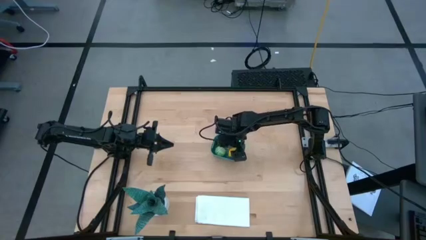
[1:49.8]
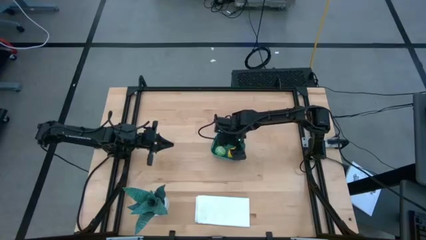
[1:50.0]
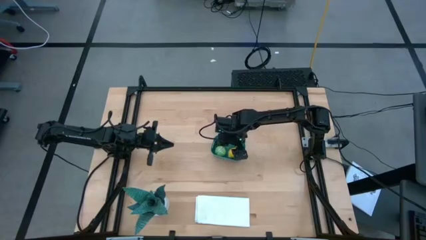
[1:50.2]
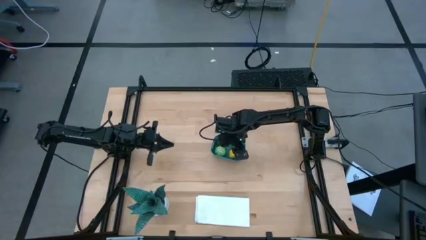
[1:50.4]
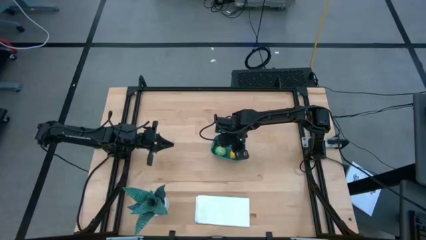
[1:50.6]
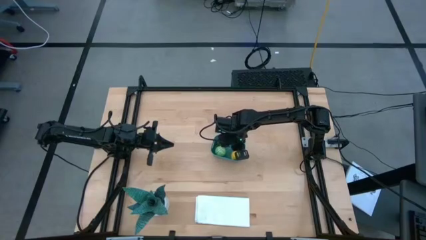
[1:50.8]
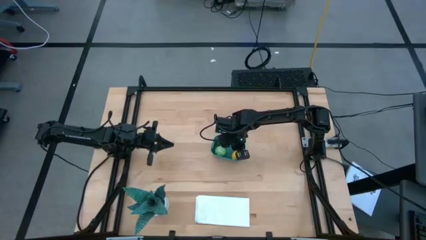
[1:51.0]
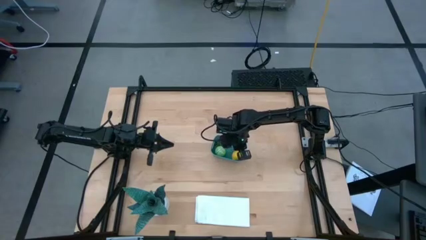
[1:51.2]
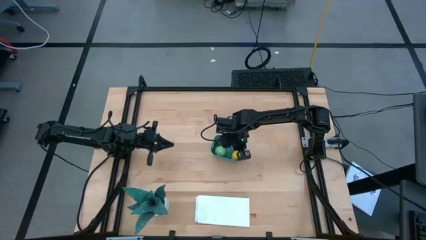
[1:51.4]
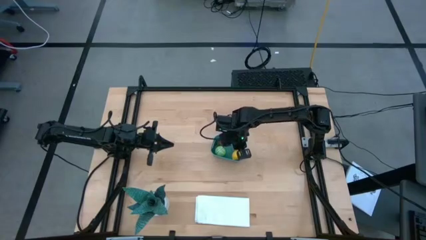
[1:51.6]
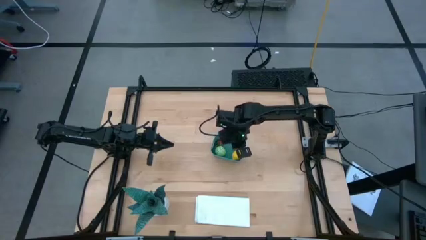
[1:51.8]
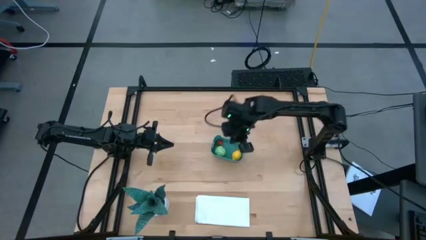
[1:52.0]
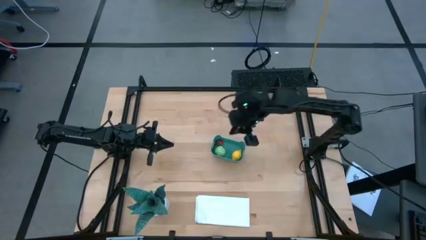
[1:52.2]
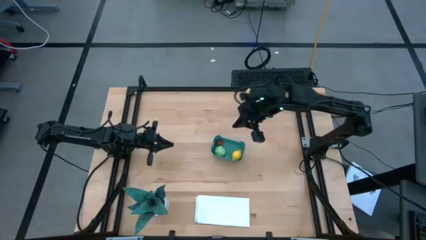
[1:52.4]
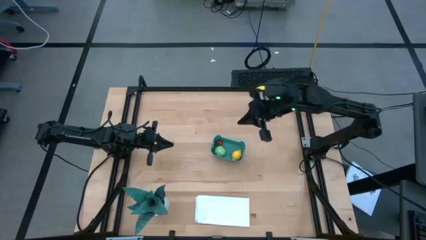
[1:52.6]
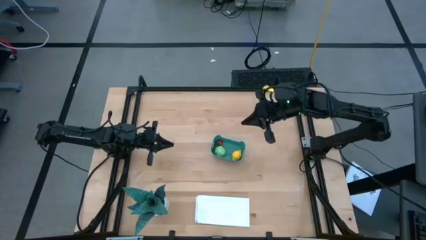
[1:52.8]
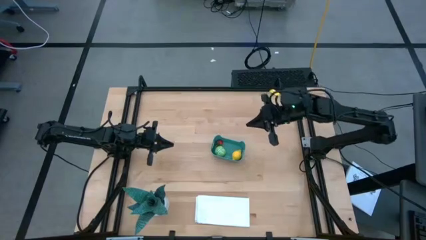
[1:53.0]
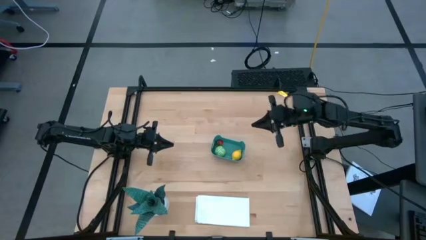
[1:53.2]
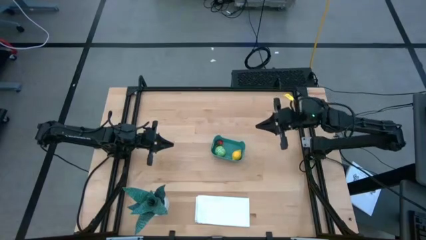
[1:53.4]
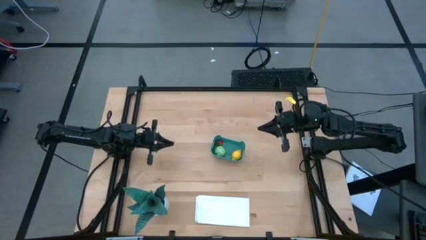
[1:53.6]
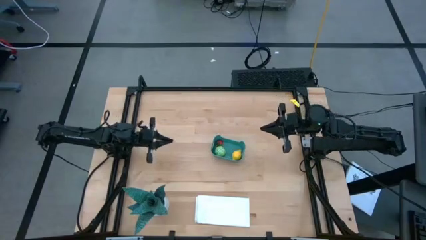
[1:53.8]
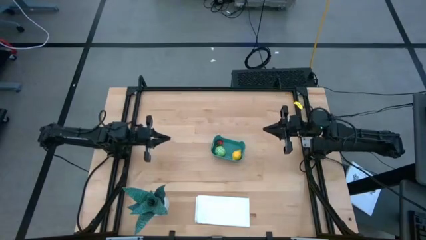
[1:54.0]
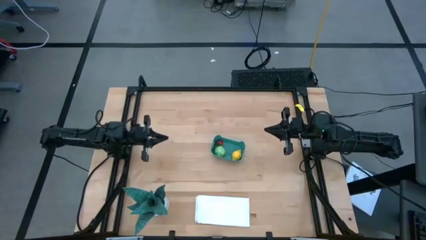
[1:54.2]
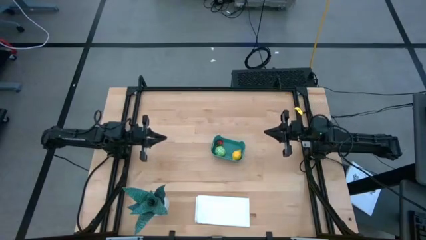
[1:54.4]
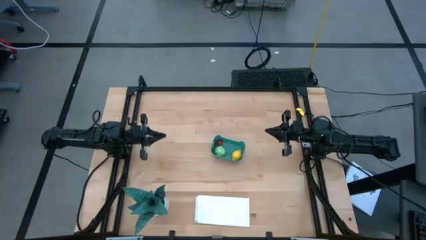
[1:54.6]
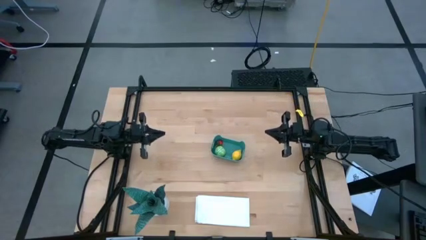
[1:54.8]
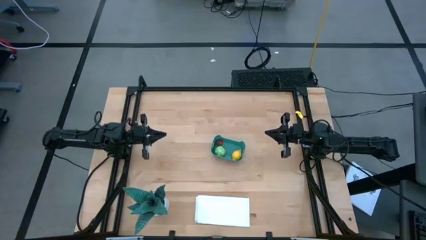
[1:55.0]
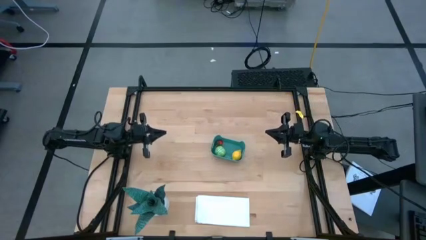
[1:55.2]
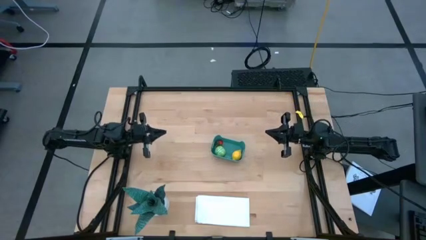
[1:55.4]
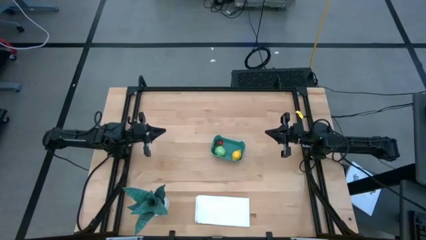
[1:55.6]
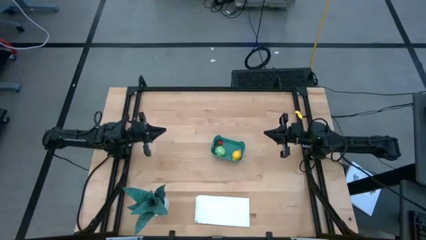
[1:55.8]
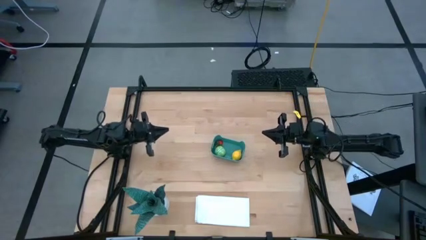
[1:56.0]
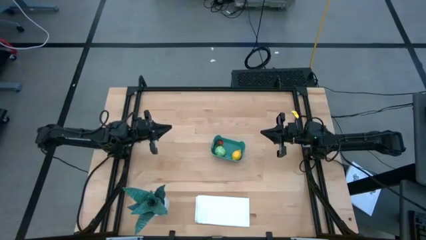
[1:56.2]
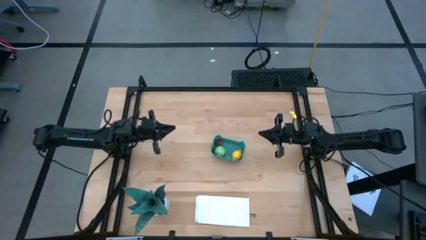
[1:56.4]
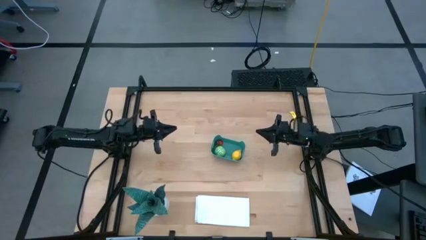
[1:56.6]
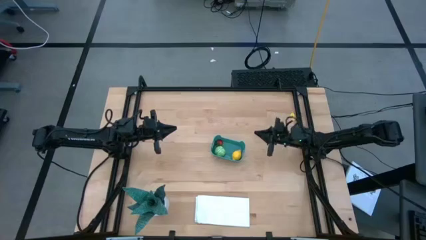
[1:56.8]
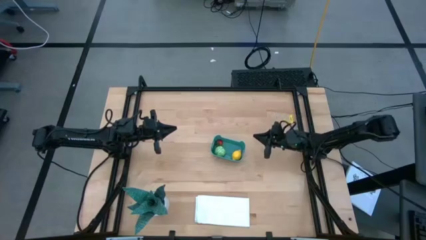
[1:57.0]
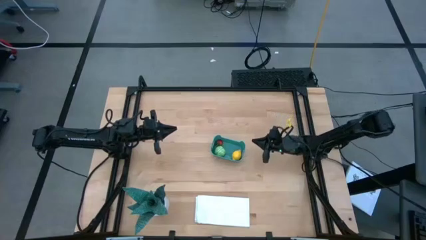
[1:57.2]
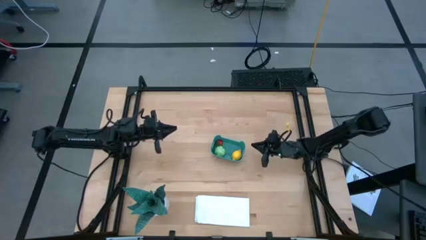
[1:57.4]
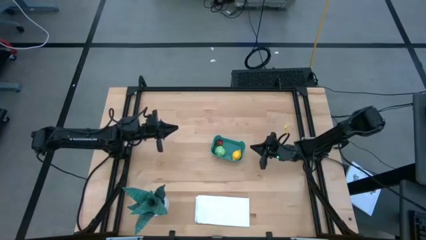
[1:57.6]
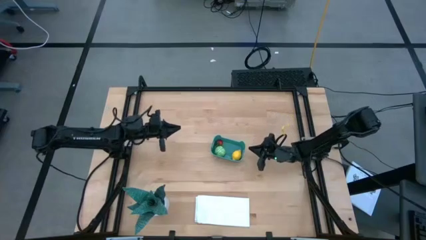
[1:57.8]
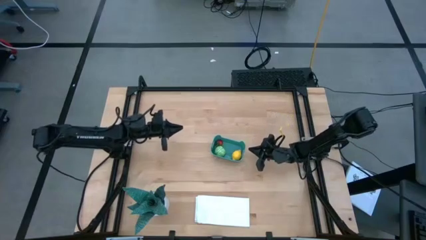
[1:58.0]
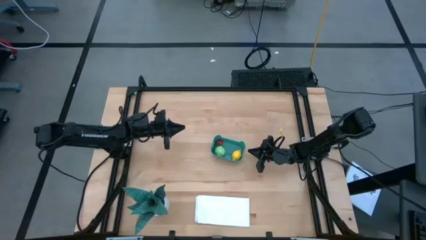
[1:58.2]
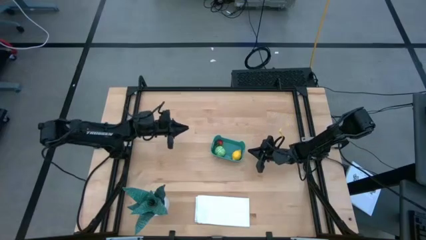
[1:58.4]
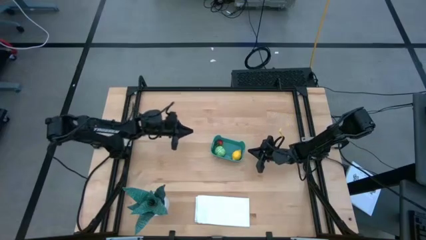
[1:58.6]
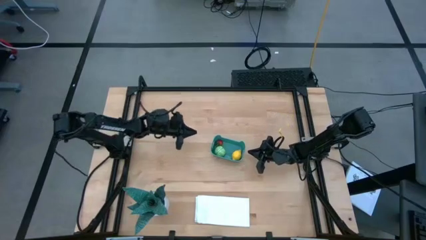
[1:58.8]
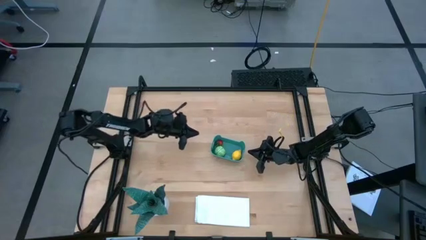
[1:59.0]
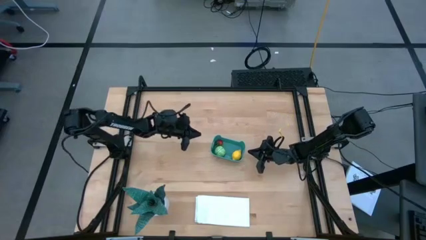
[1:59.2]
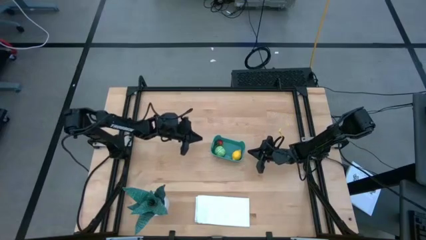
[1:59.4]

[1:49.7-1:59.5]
Task: Pick and placing Produce into tupperware
Adjust the blue bin

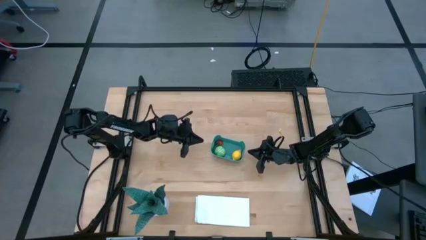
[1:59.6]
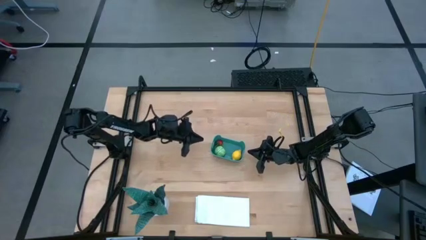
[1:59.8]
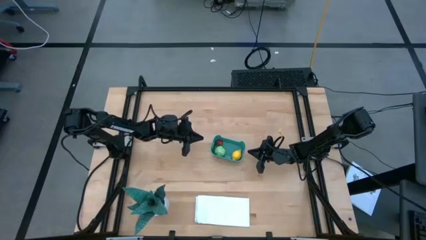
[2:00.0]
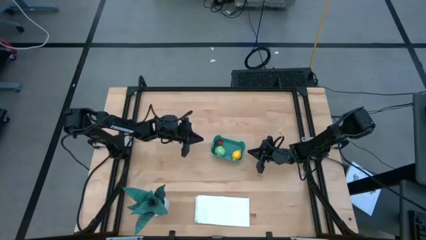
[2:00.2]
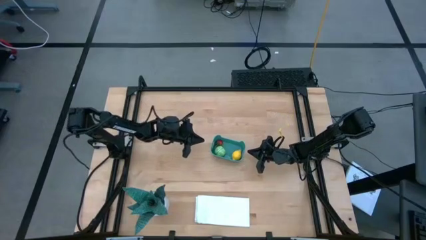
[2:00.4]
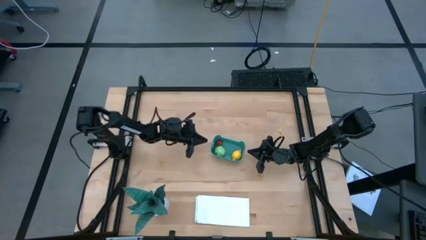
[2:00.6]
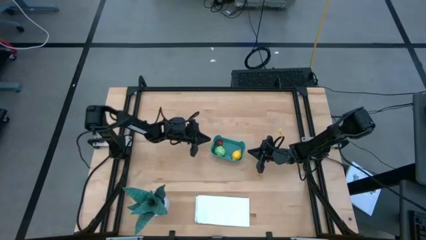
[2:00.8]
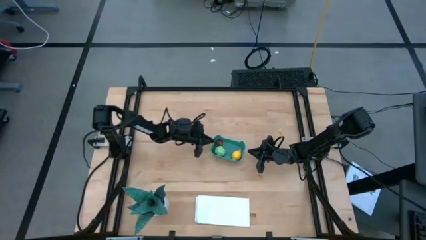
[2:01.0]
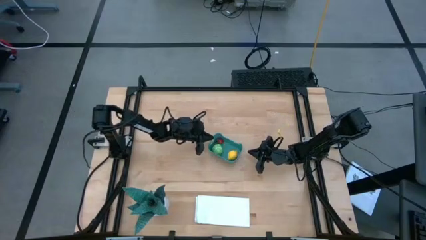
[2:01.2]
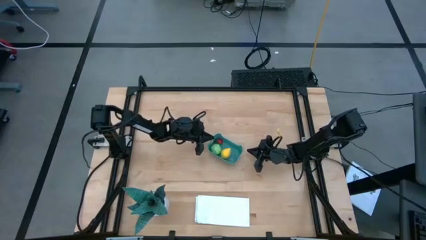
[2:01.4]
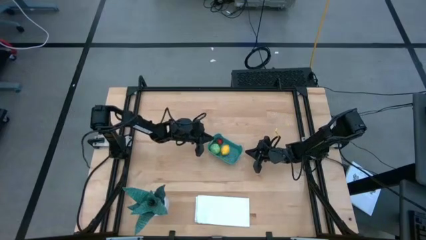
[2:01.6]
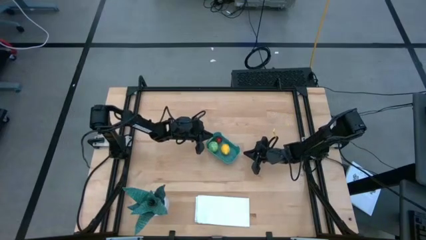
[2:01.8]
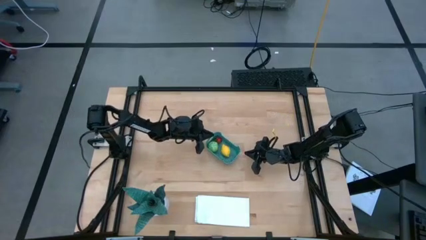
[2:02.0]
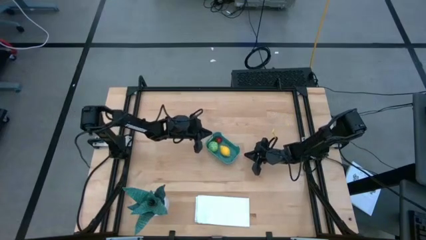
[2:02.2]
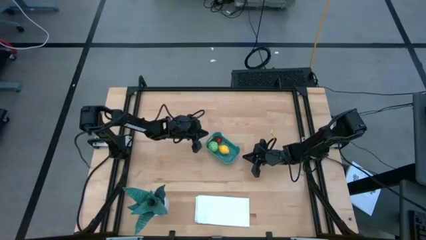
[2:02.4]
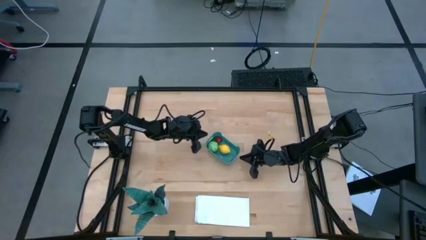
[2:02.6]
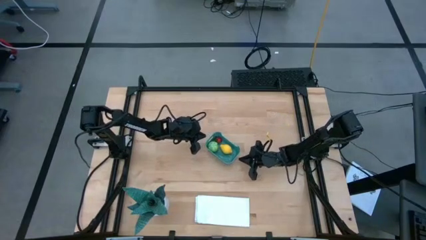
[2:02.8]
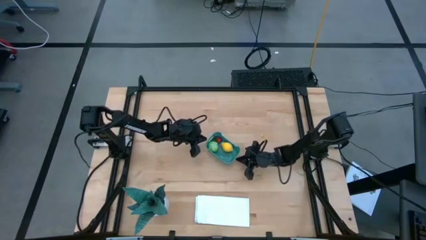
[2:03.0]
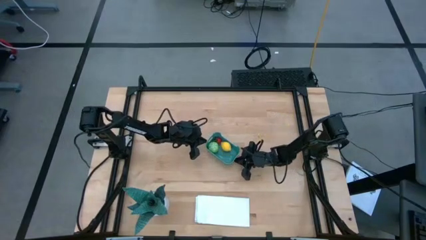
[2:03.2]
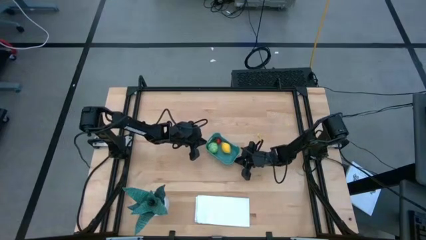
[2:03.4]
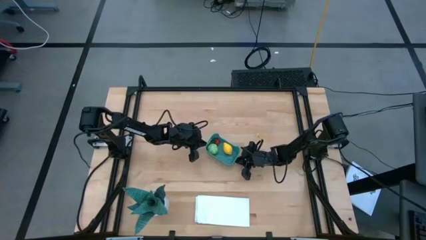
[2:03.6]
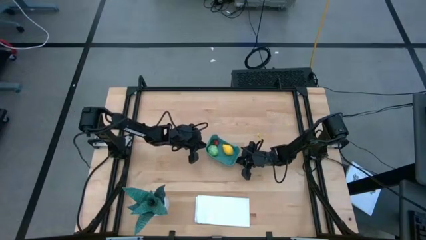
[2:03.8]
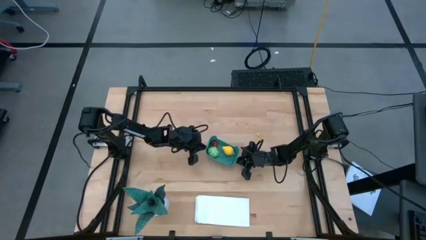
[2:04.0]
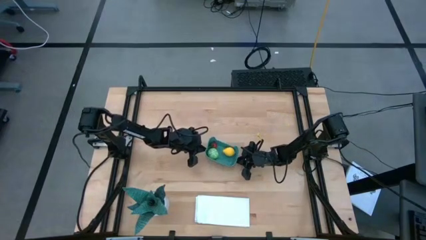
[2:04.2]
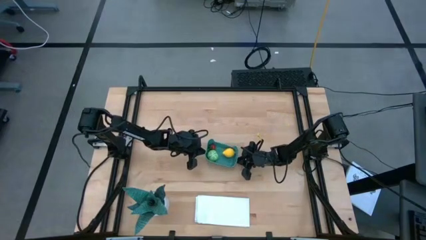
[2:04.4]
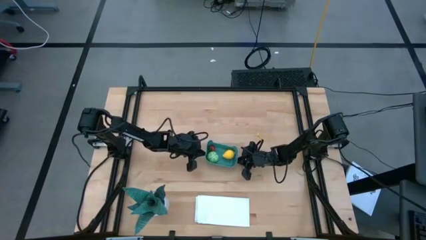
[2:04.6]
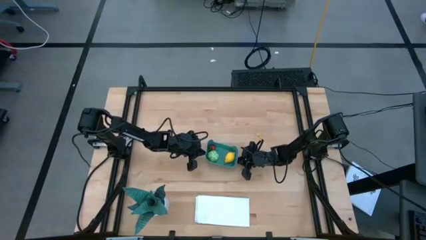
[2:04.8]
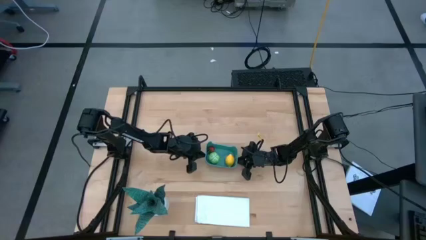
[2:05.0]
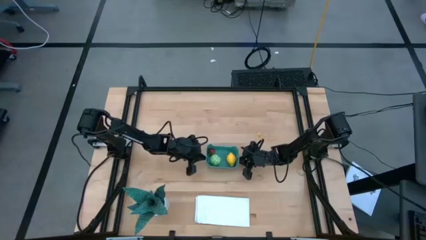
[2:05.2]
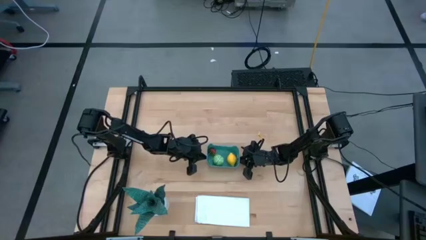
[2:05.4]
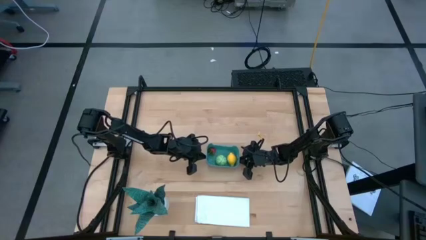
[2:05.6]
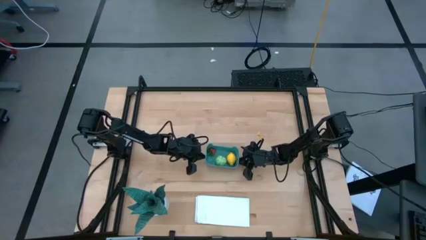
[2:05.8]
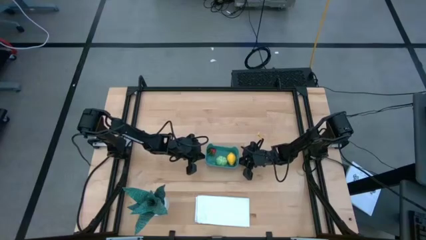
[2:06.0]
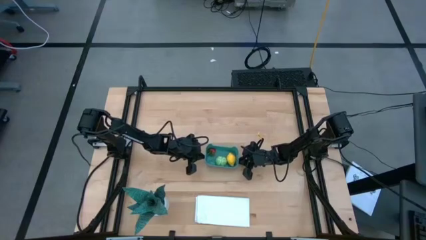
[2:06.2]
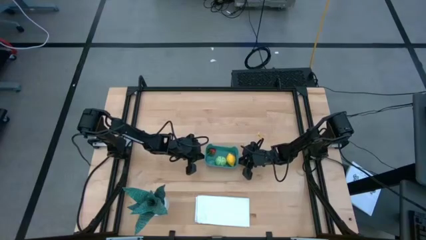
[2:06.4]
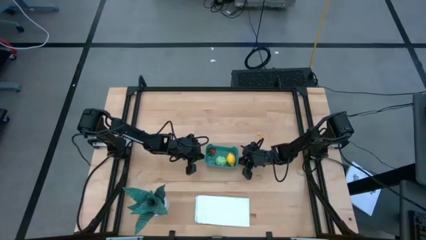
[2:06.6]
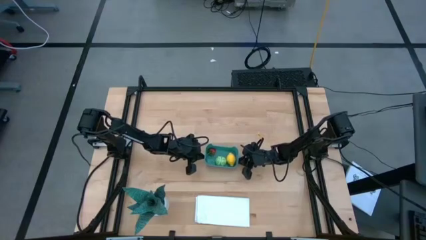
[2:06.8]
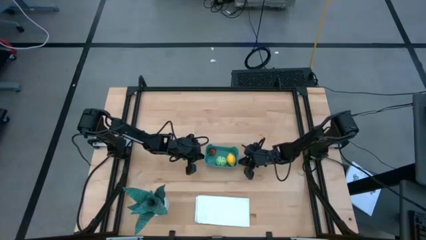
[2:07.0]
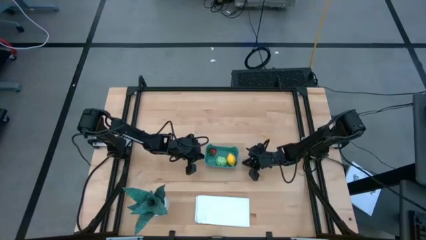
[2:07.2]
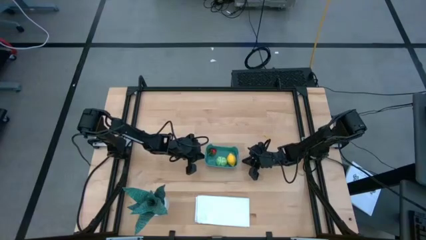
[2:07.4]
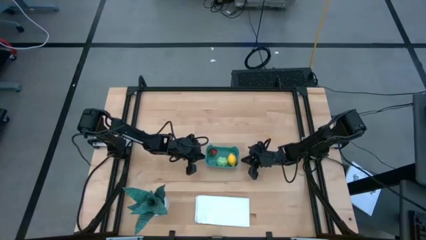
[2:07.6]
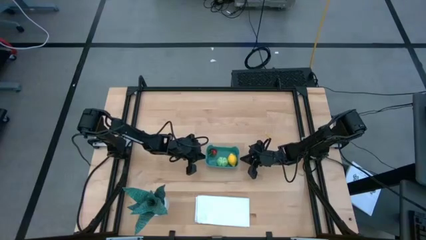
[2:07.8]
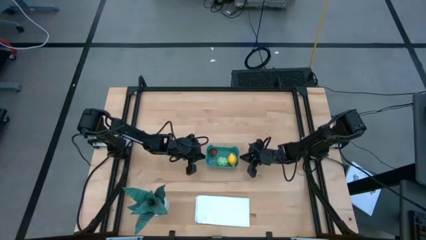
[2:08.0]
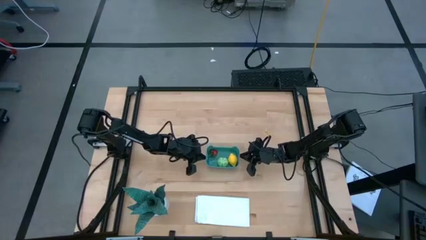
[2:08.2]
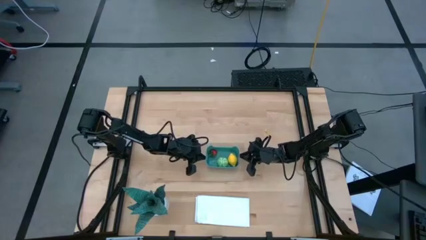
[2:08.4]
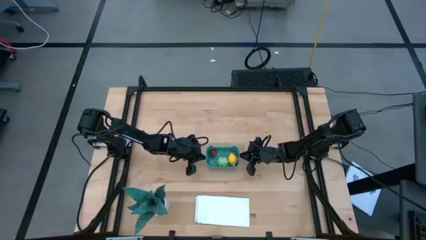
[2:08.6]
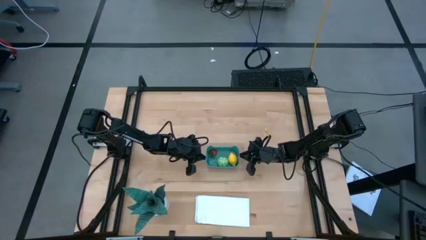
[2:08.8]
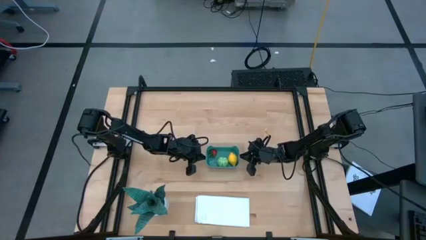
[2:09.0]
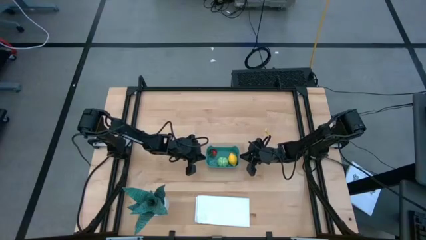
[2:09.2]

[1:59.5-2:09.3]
Adjust the blue bin
